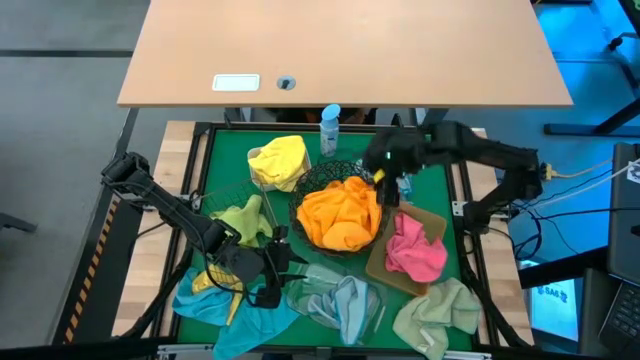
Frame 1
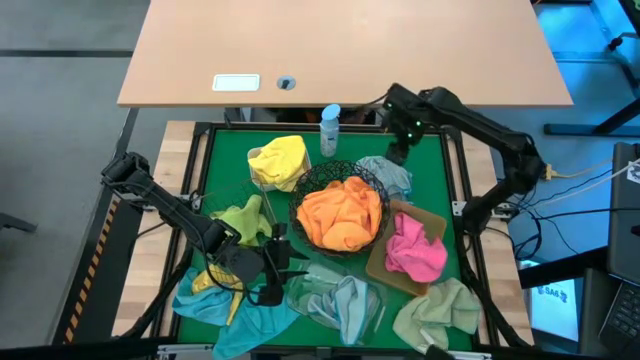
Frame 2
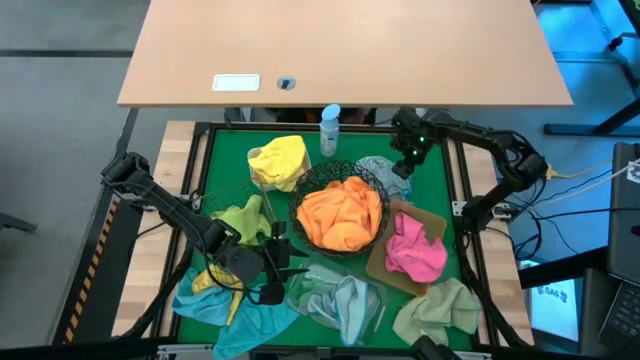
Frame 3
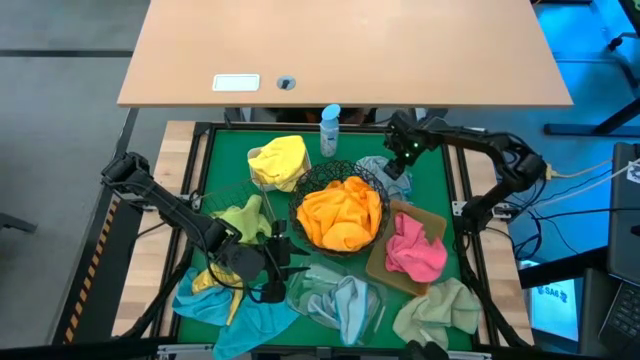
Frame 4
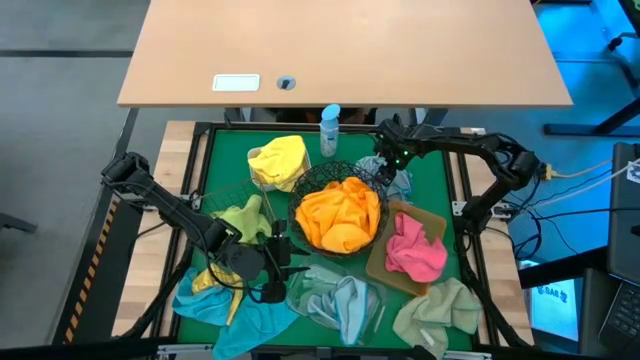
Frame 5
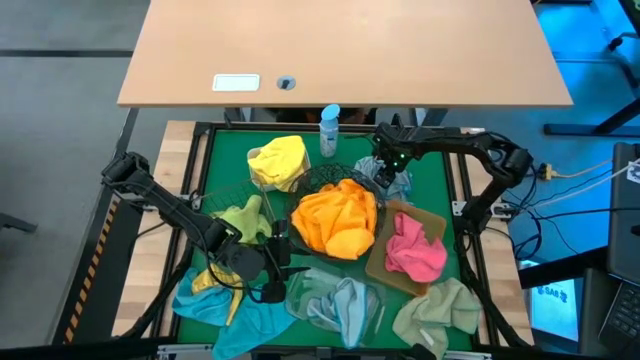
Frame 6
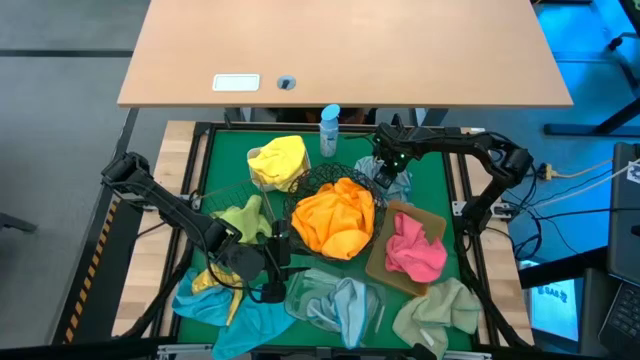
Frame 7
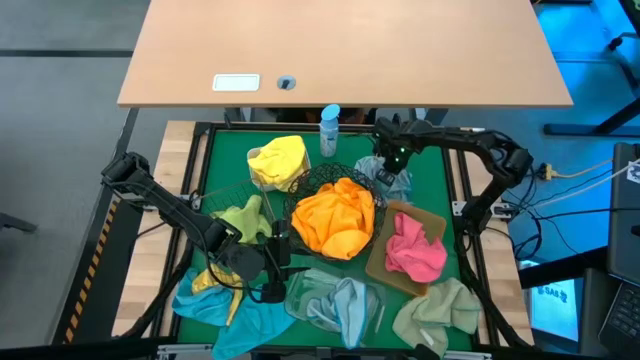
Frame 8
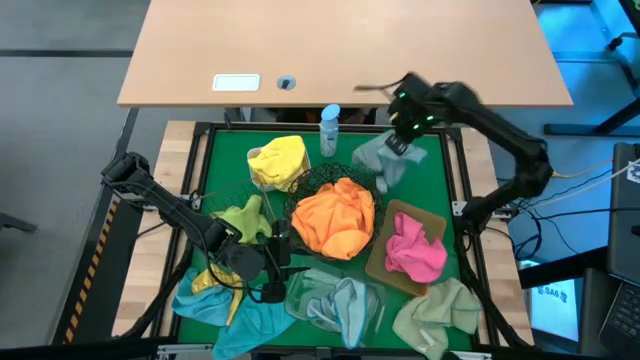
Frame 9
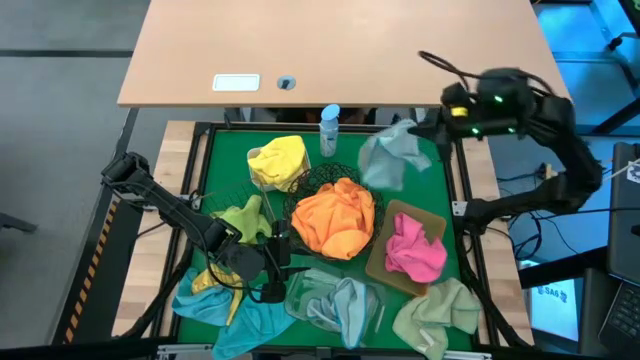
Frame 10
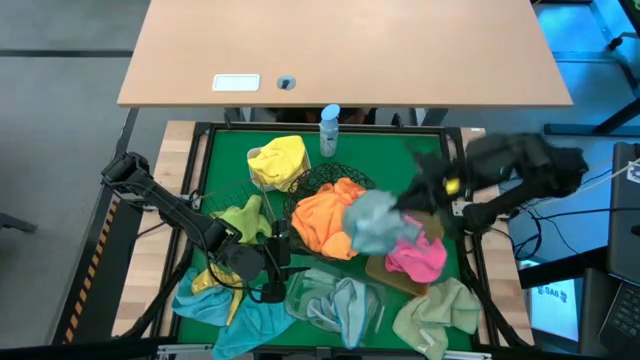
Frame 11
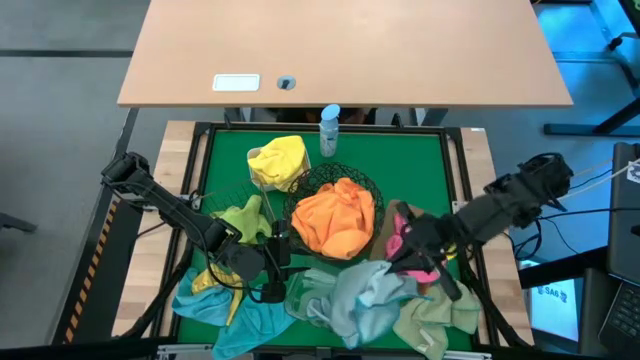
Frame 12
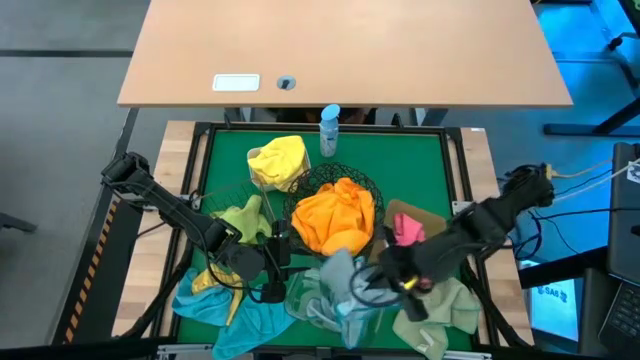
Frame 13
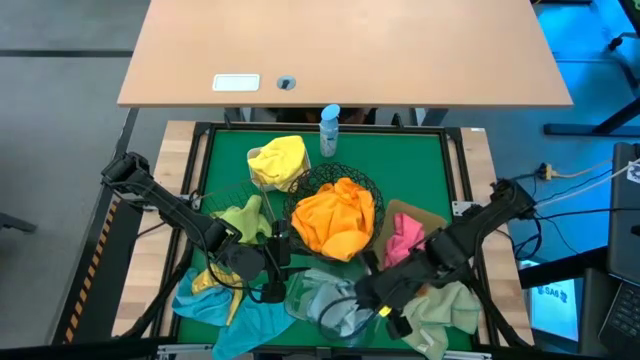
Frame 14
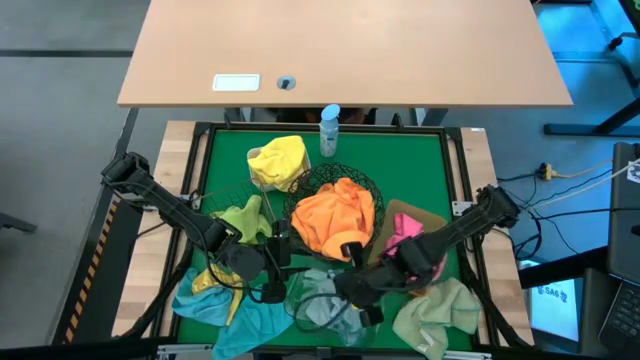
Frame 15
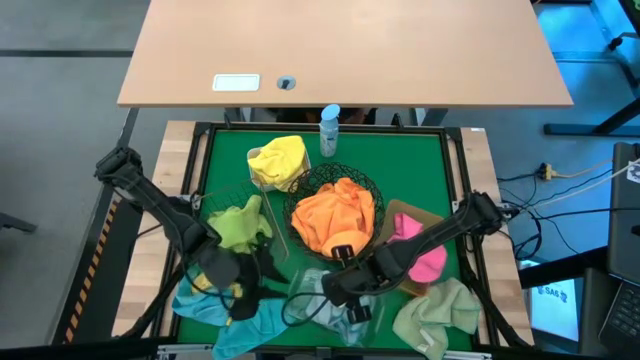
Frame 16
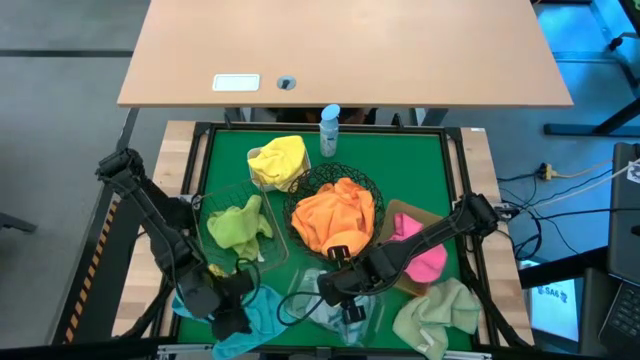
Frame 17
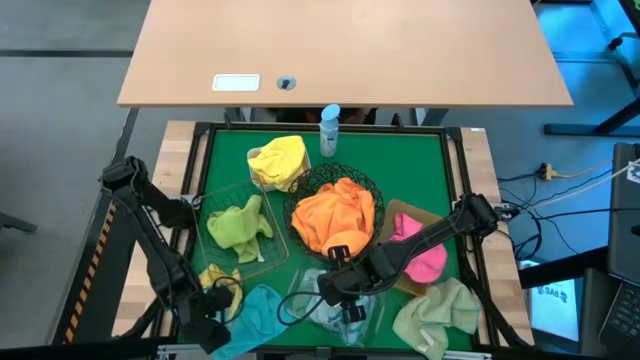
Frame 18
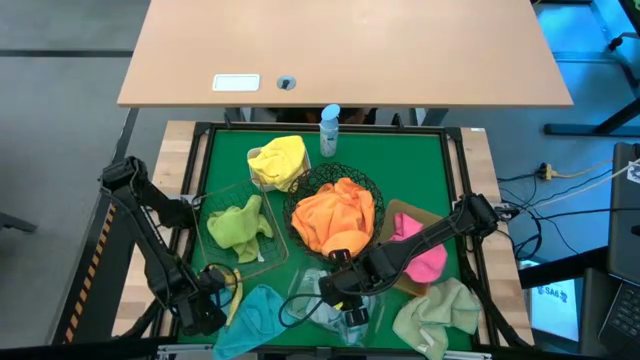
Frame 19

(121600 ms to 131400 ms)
Task: Sort microfiber towel by color & place in baskets
Put the light blue towel into the transparent bin

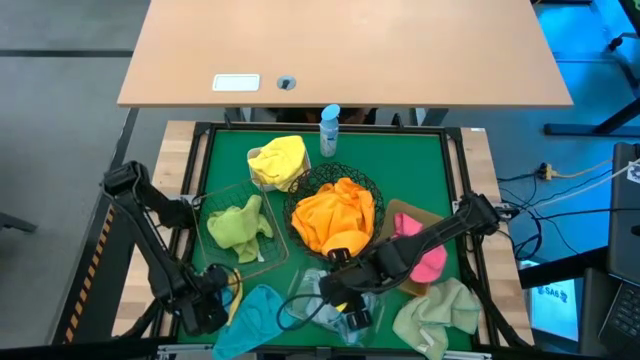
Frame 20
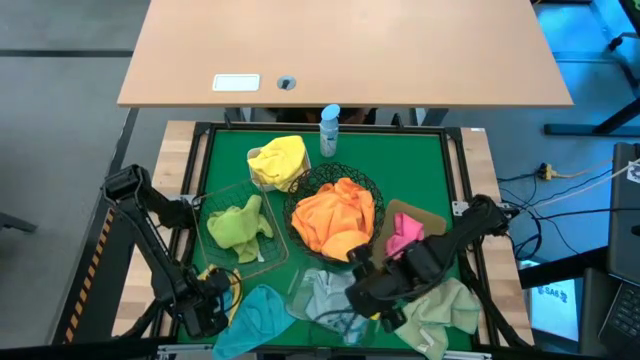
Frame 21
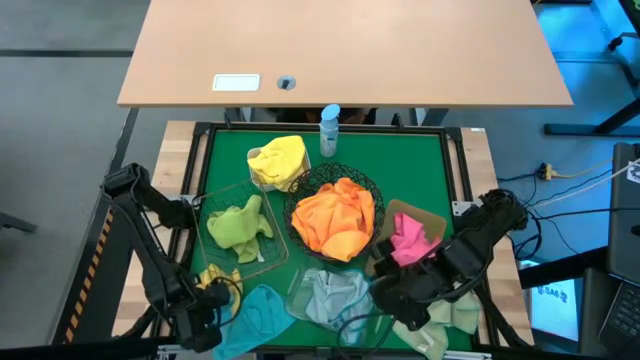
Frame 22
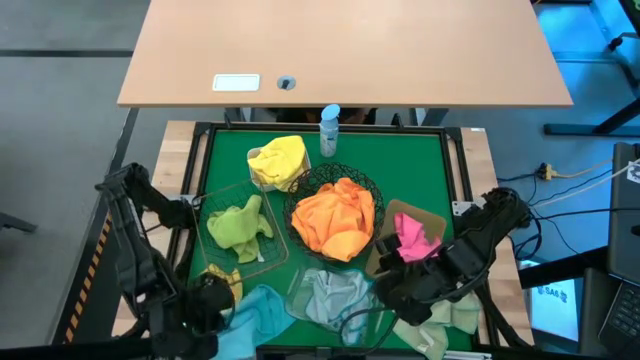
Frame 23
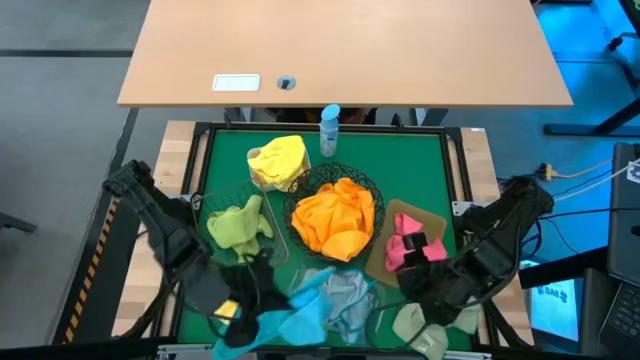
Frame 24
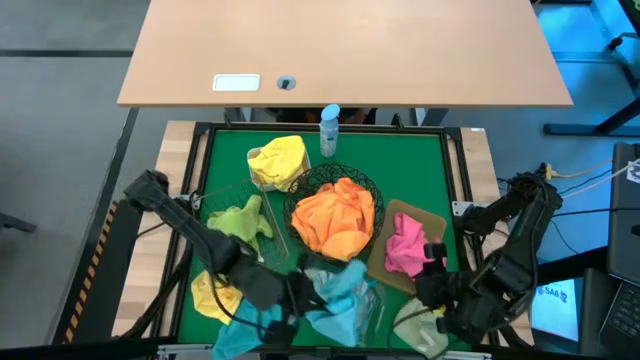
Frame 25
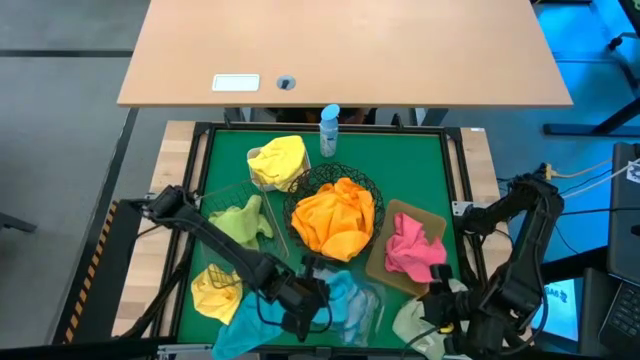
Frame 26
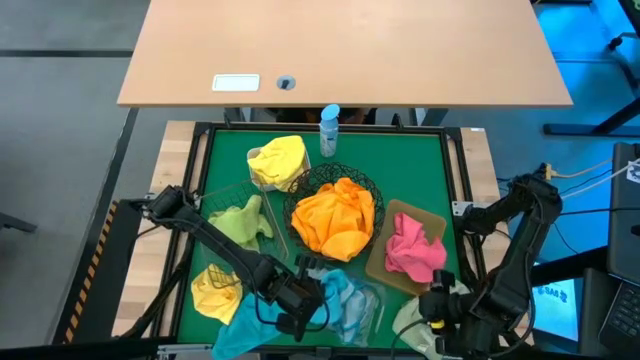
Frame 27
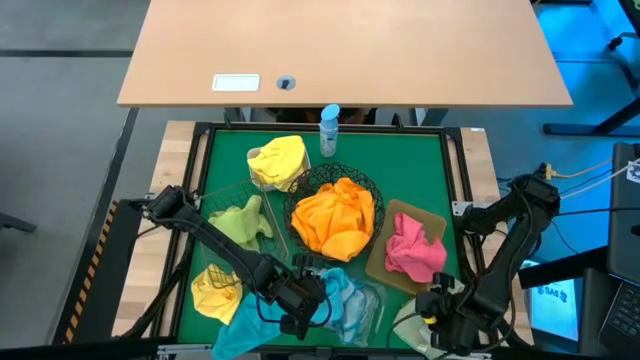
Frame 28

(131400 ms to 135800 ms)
Put the blue towel into the transparent bin

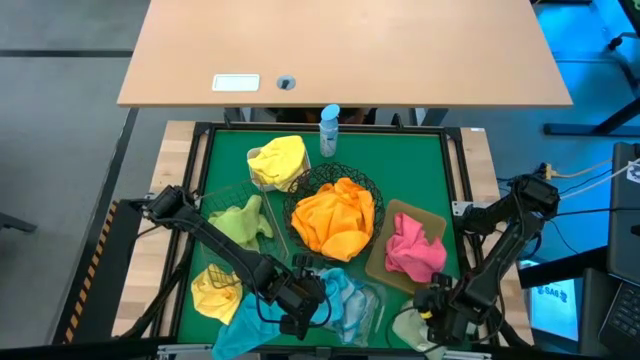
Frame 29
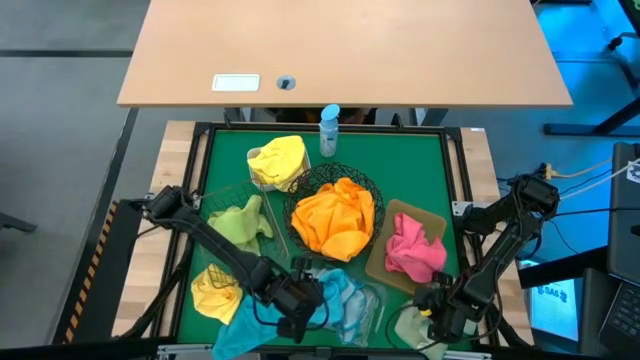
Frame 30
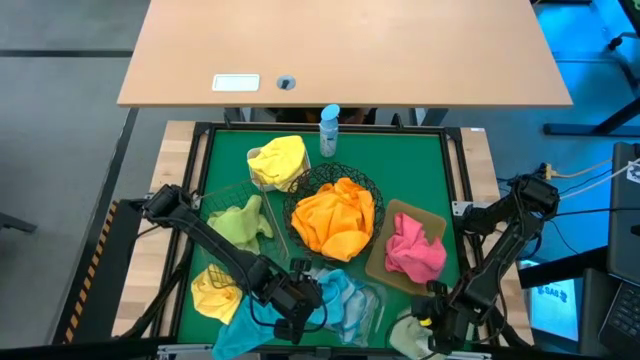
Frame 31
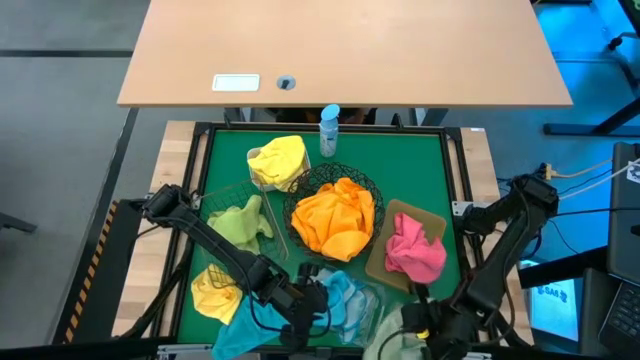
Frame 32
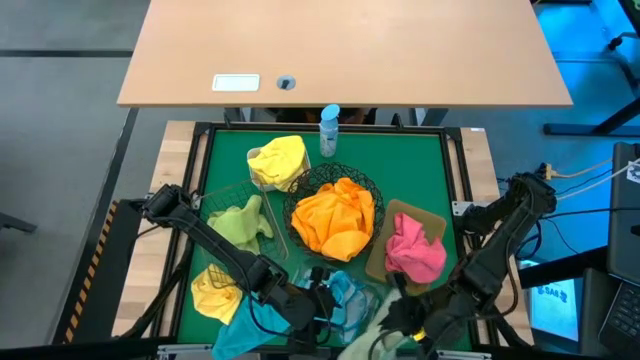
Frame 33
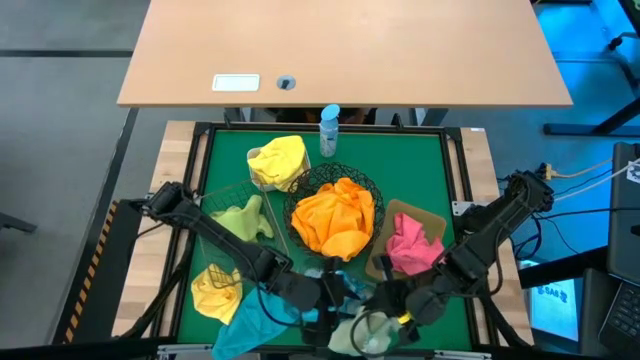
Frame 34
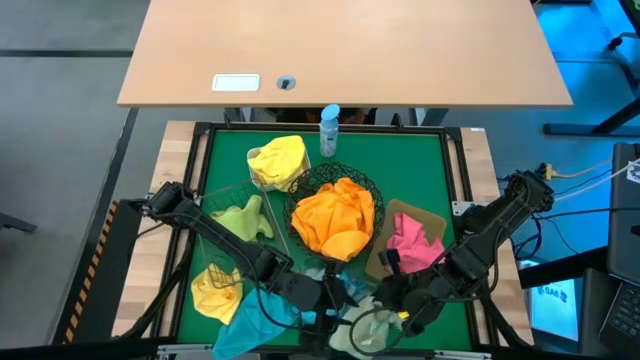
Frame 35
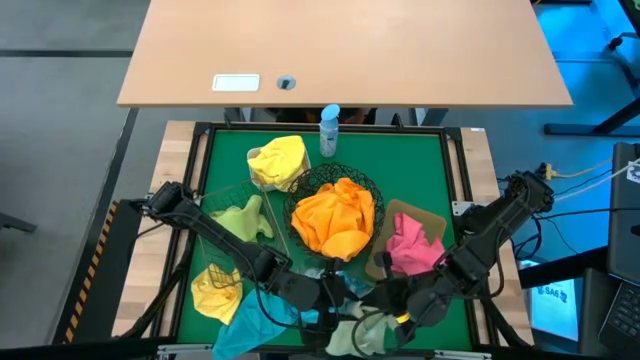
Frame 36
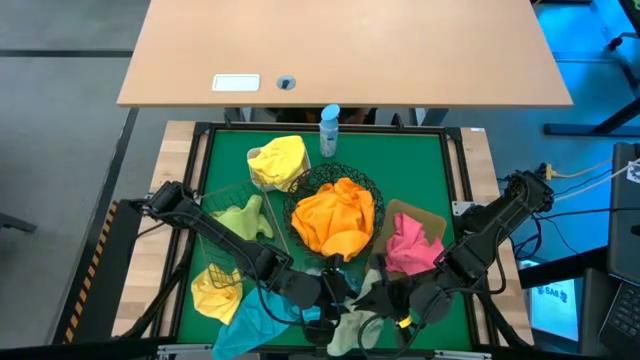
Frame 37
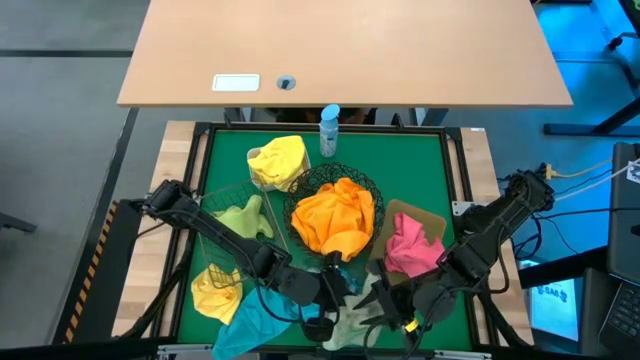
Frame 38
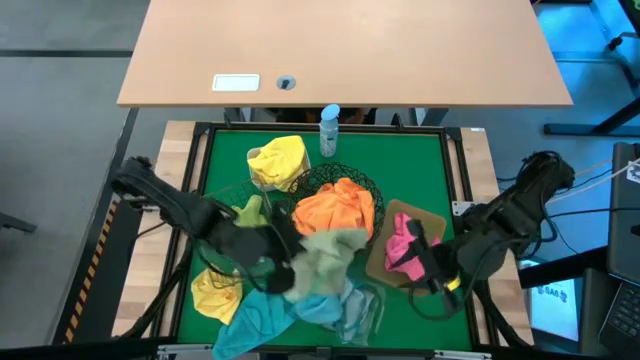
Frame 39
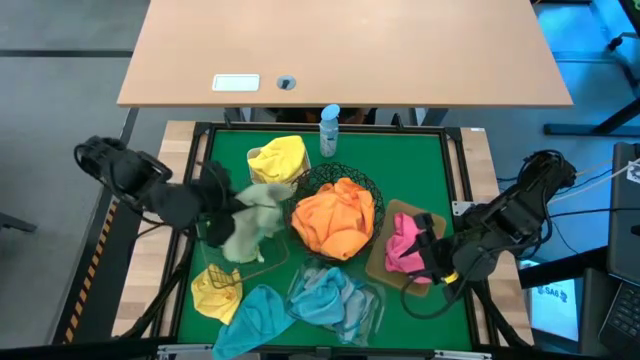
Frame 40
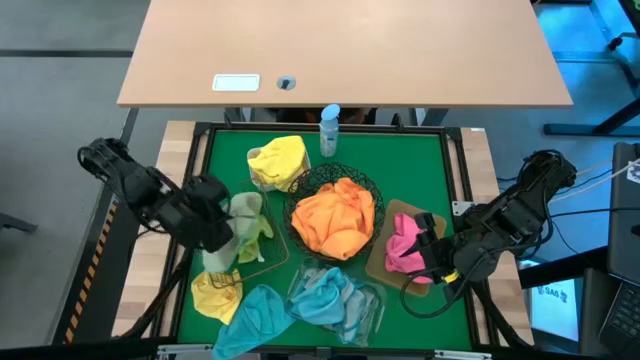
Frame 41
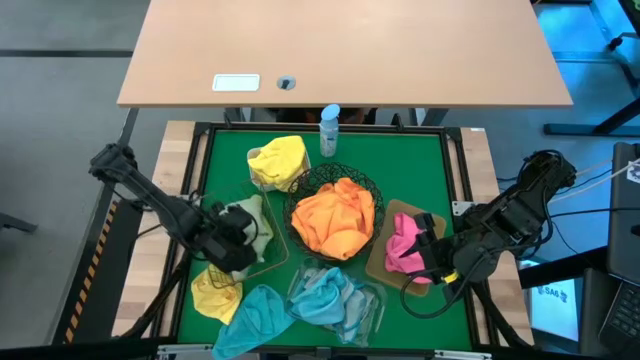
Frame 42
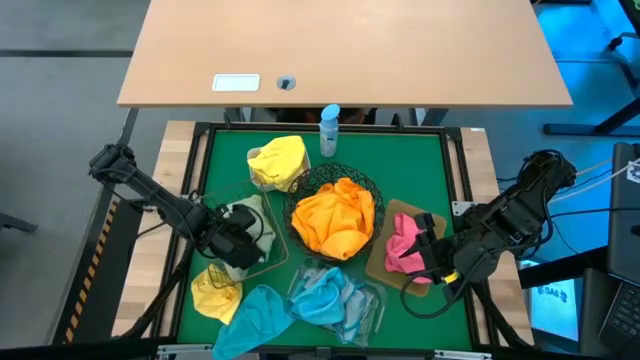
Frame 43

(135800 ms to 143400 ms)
Put the light green towel into the rectangular wire basket
